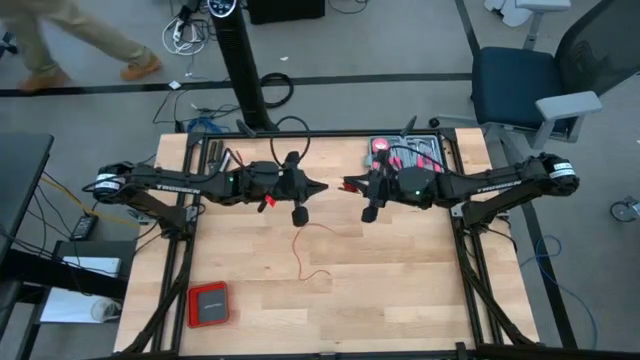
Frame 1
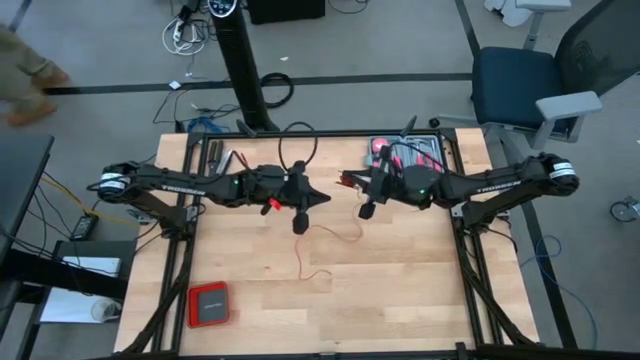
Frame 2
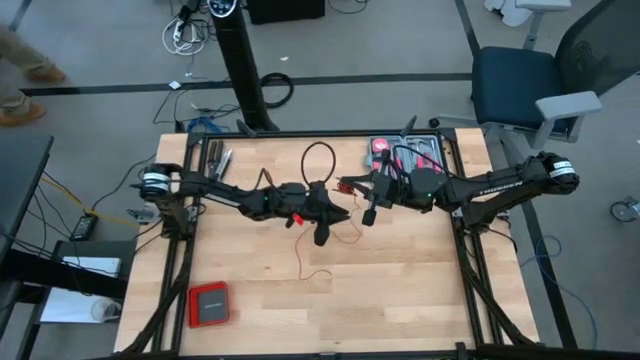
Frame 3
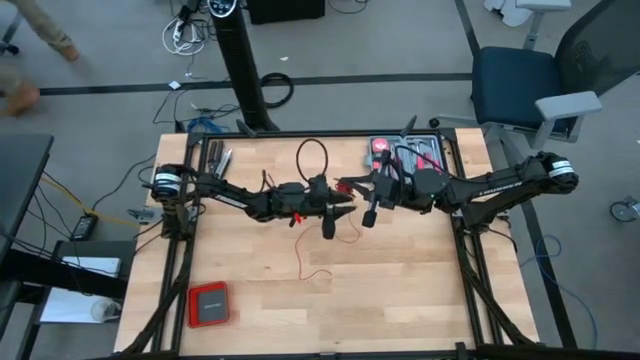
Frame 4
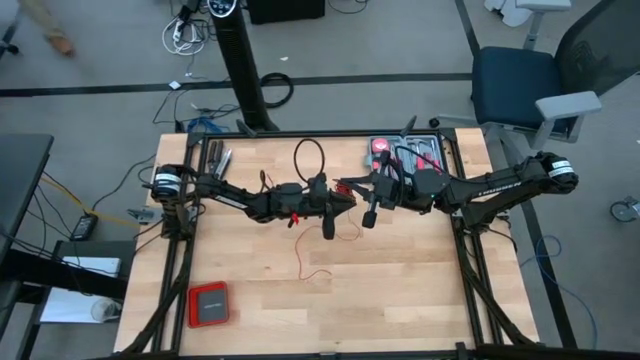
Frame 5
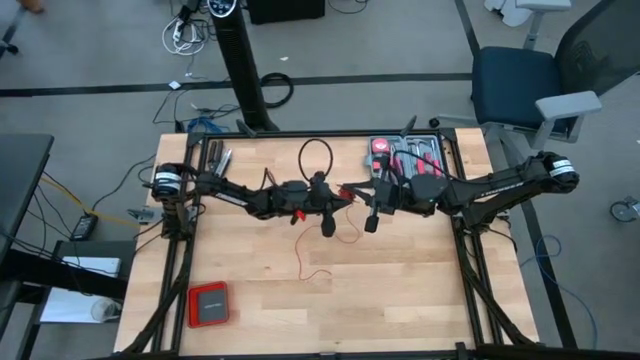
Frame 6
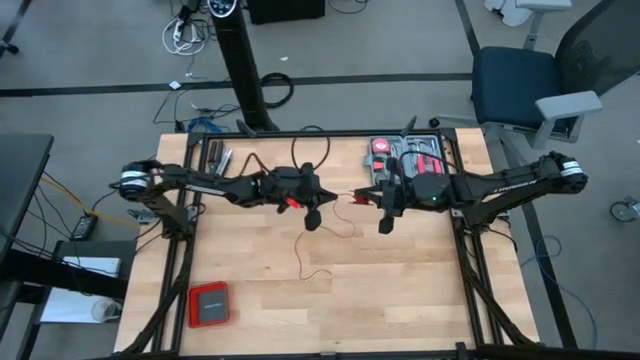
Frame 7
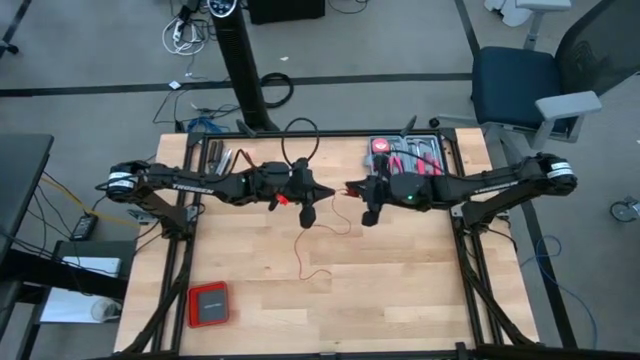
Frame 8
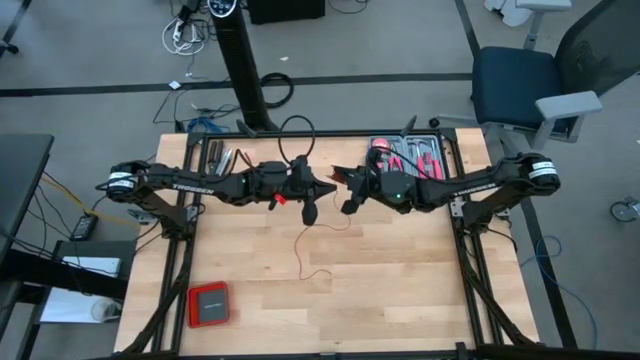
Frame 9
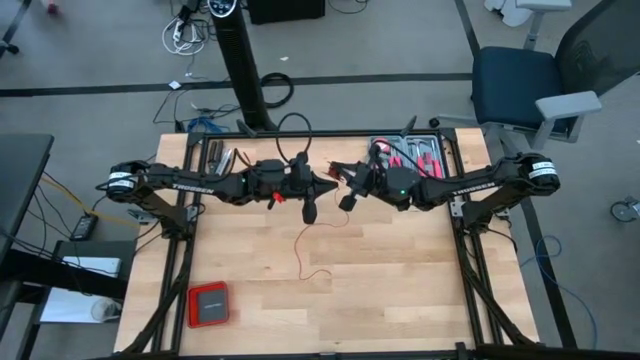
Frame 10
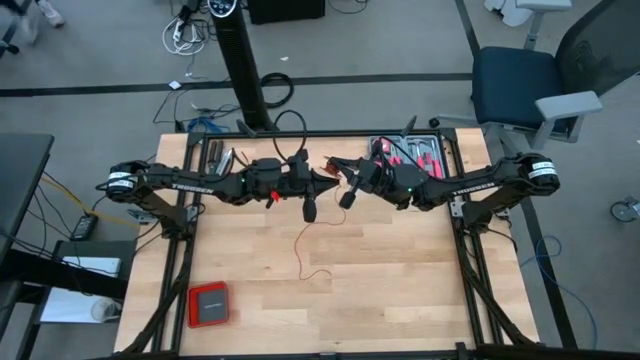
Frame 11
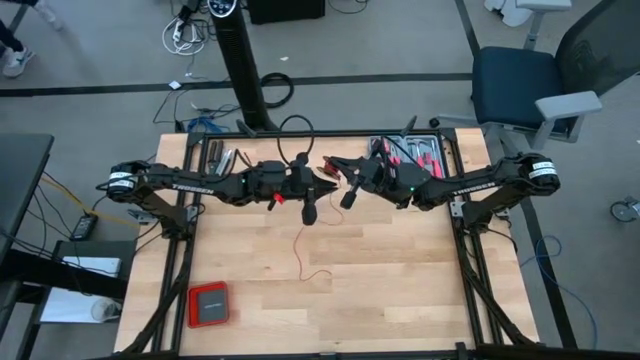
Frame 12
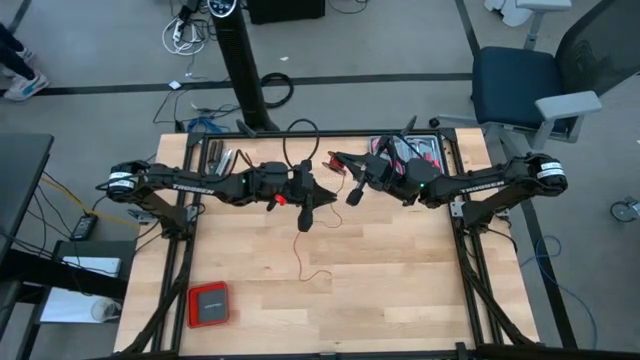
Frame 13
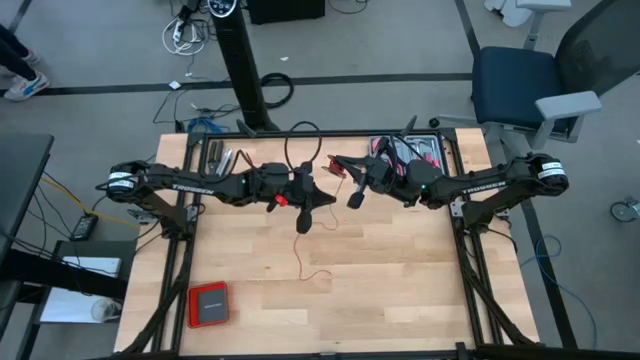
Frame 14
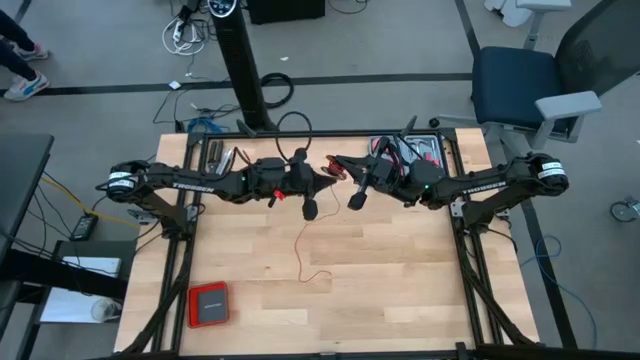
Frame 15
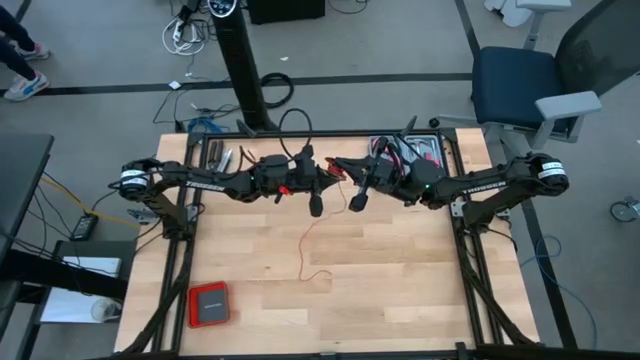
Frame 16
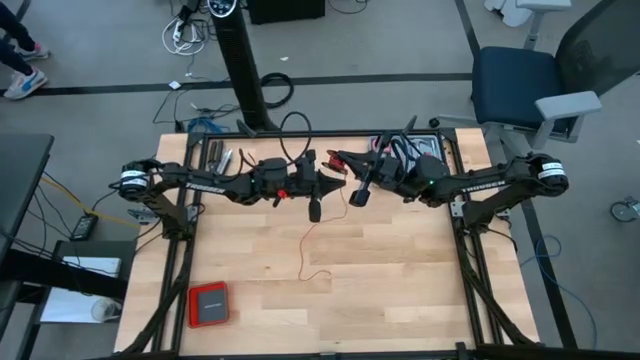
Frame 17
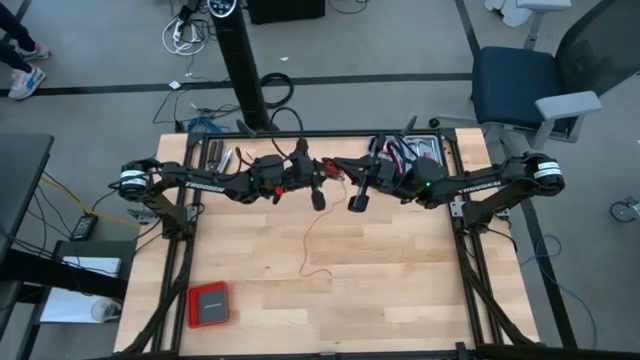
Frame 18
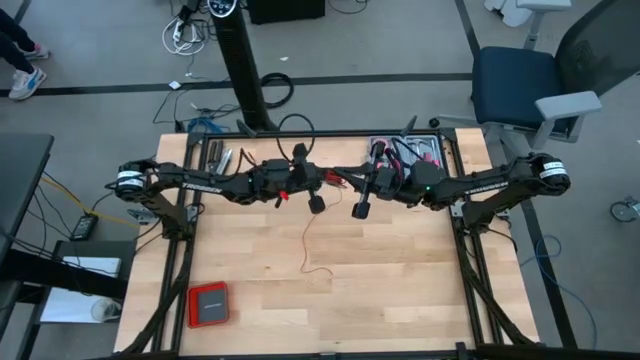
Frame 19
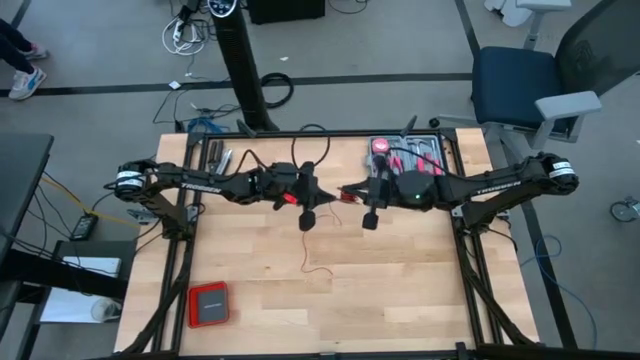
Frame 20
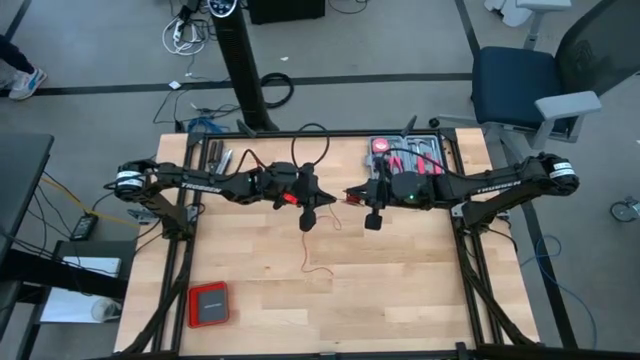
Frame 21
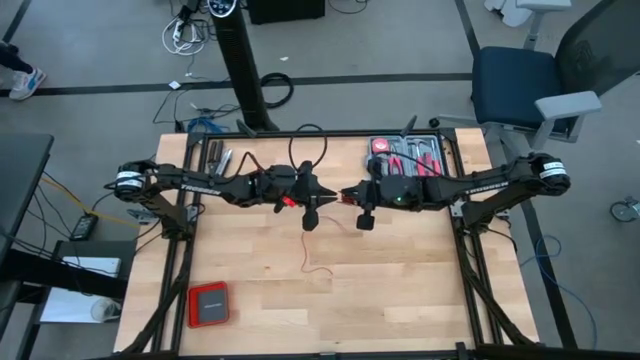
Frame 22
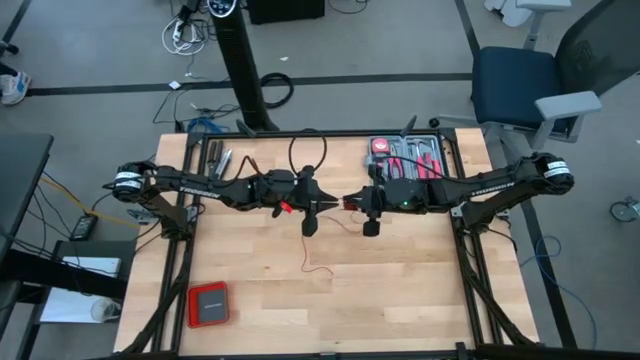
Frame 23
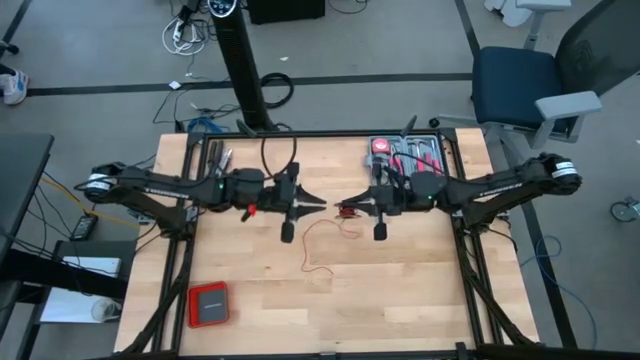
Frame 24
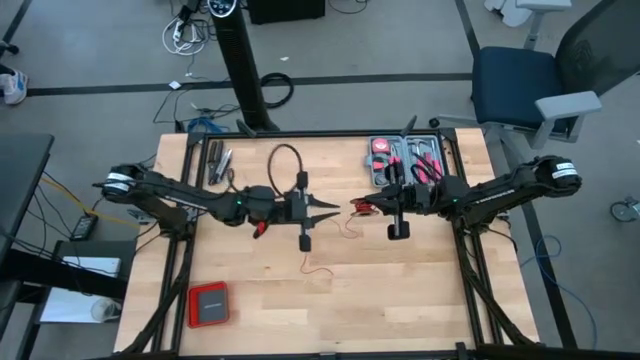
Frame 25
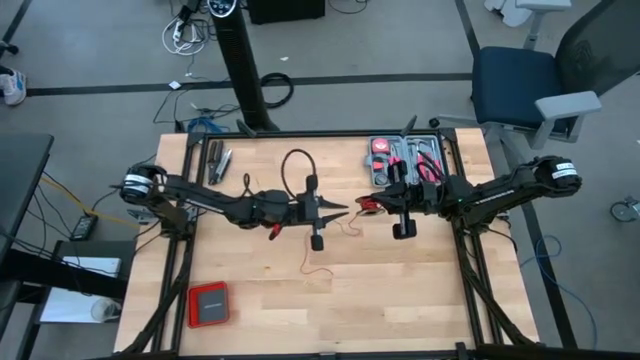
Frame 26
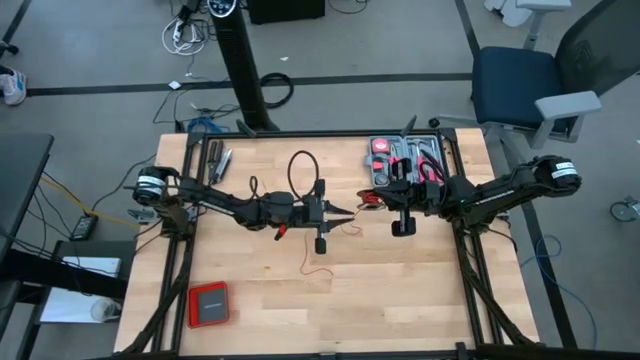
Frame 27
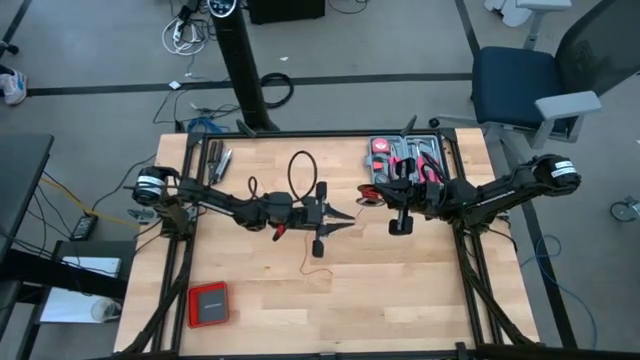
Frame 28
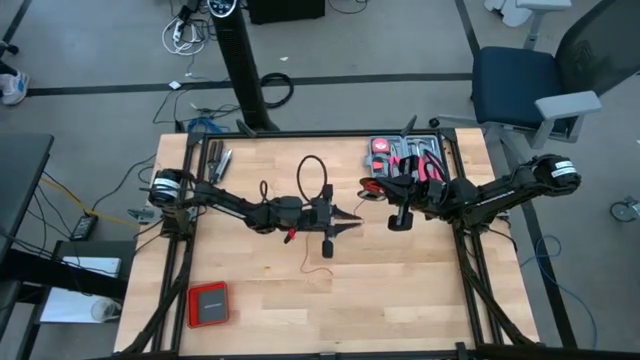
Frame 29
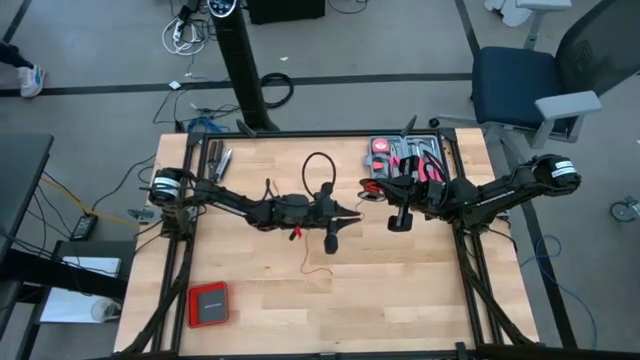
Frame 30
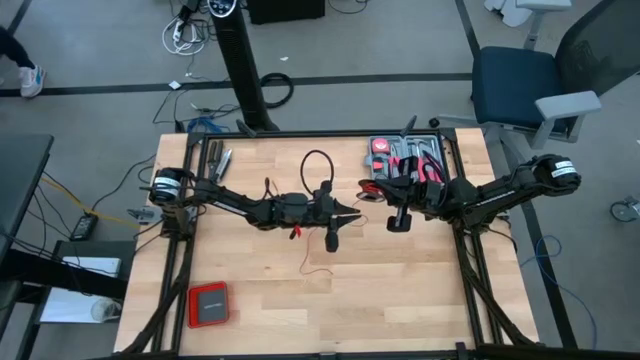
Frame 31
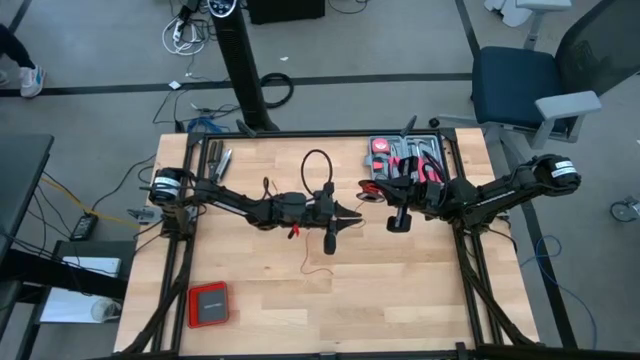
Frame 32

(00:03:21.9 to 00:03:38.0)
Task: Coil cords
Coil the red cable wire onto the black spool

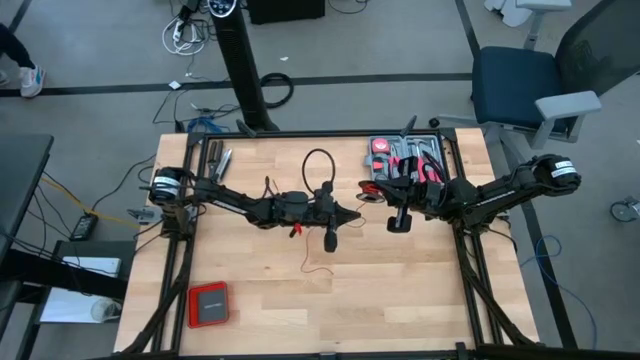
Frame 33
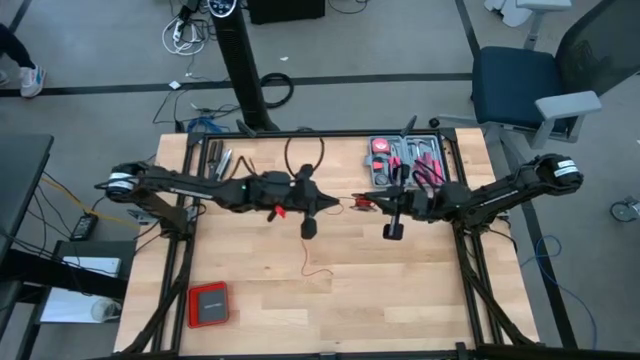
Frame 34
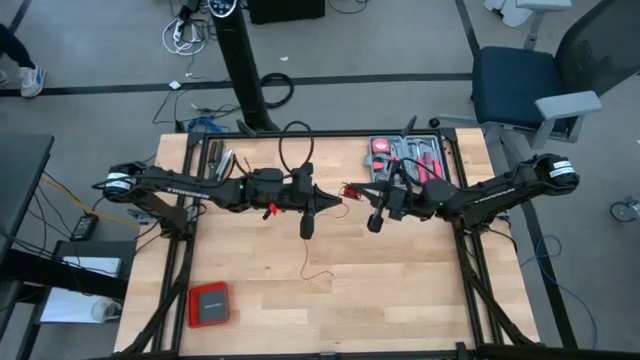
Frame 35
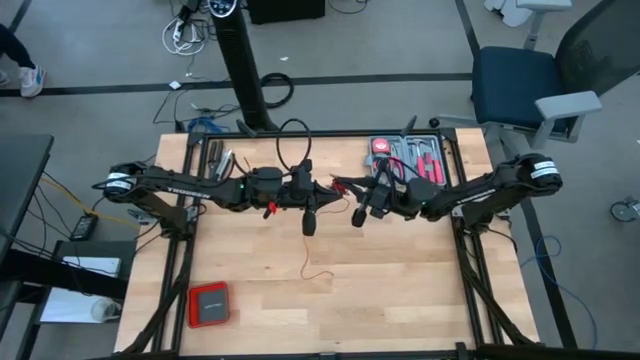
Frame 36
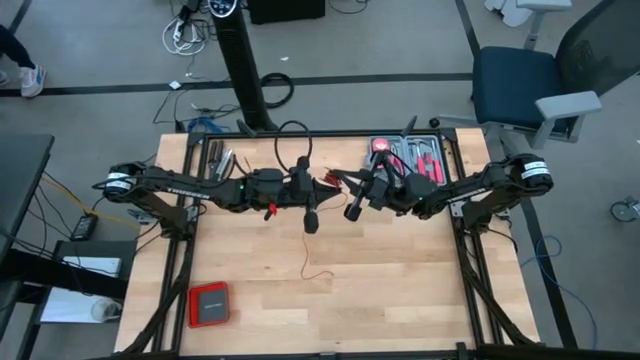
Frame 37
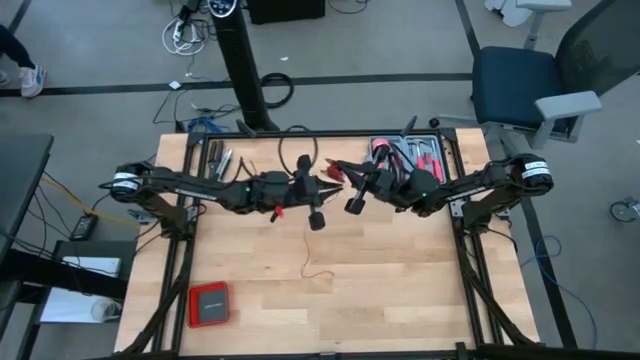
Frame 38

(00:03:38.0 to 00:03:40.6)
Coil the red cable wire onto the black spool

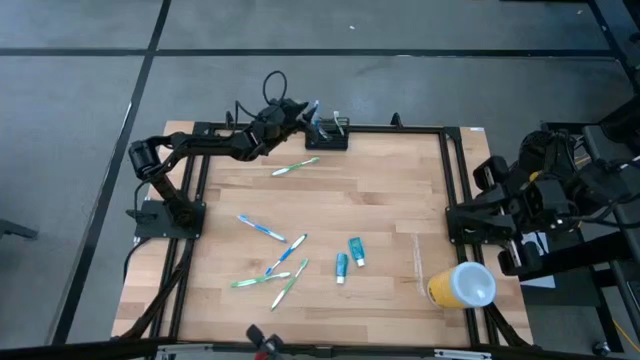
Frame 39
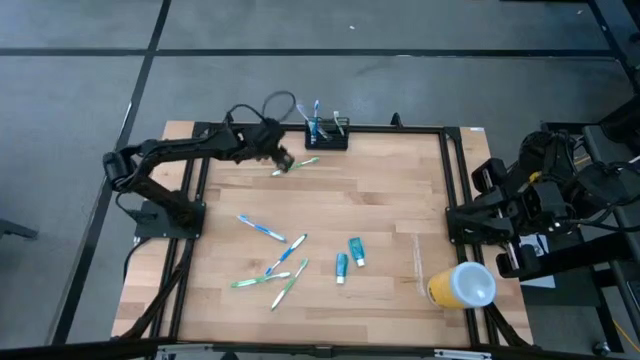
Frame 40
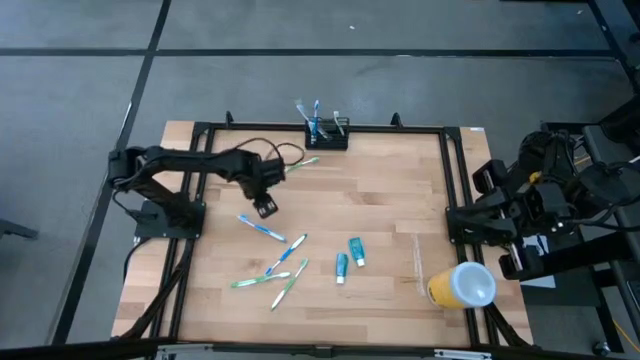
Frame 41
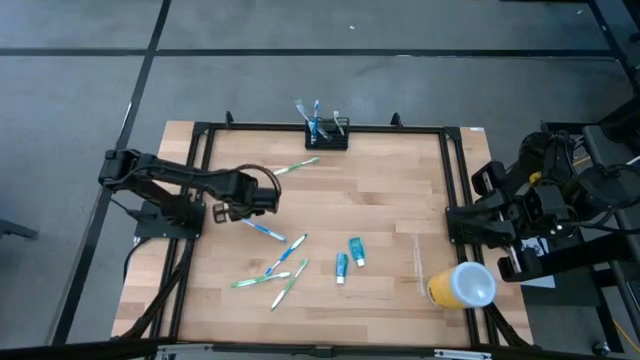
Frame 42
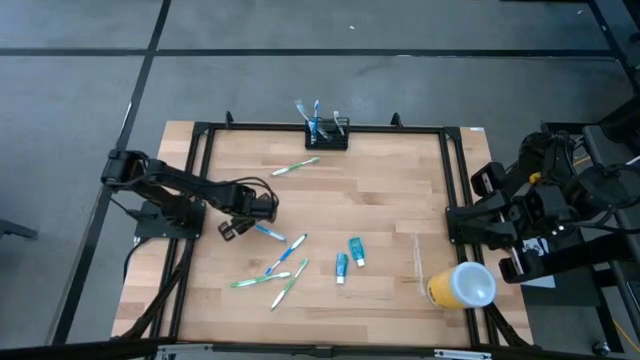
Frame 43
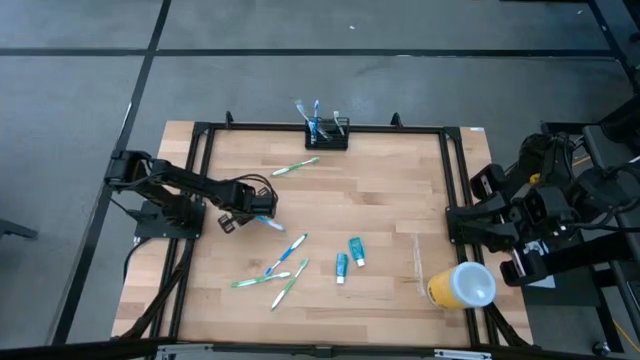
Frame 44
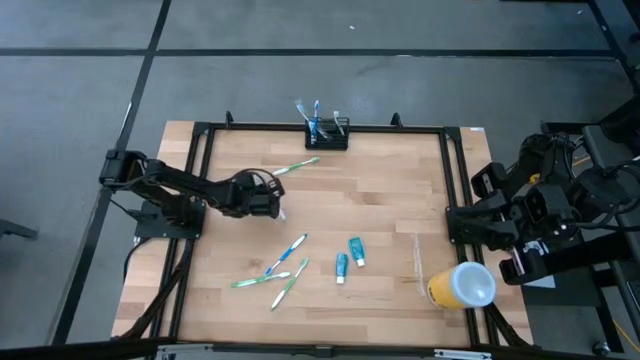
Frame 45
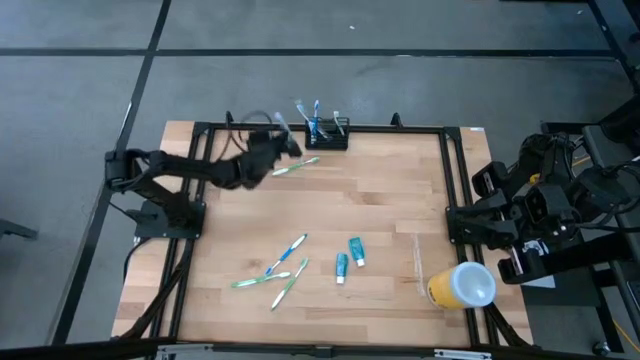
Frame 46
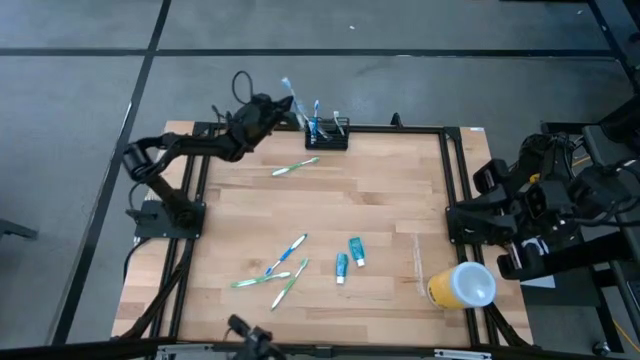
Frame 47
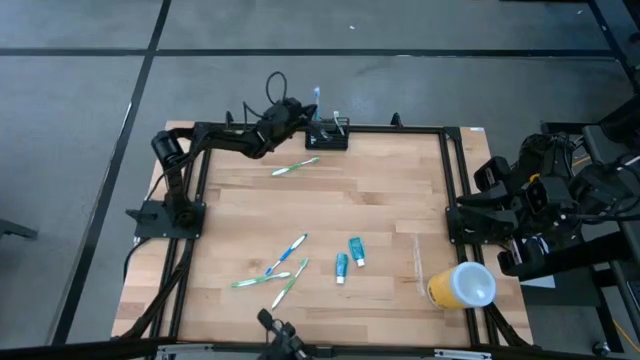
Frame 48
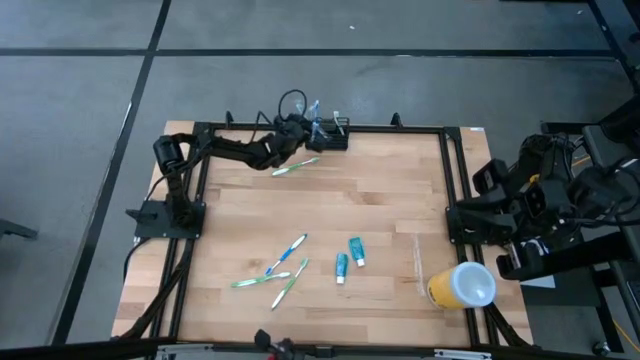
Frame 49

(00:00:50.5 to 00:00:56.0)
Task: Pick & Place toothbrushing station
Put the blue toothbrush into the wire organizer
